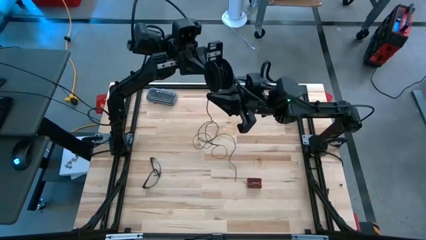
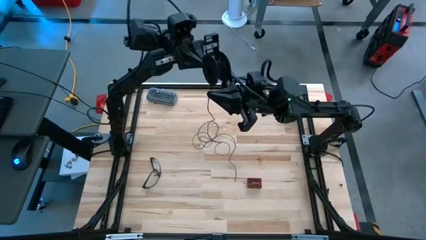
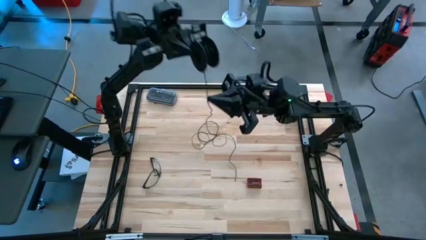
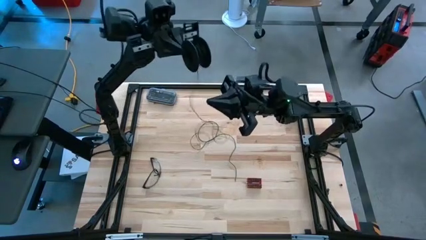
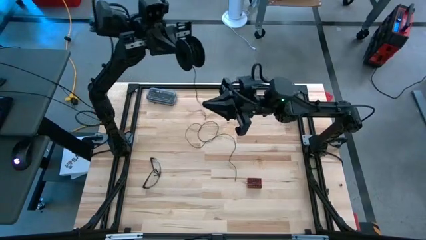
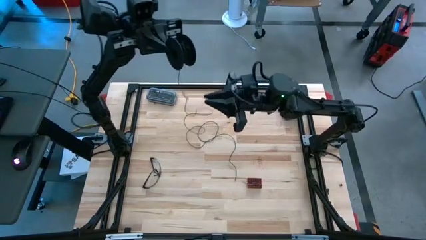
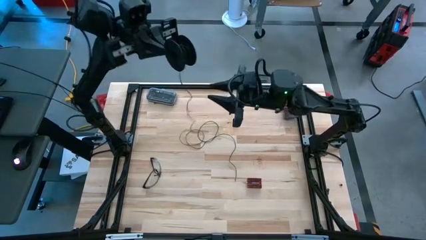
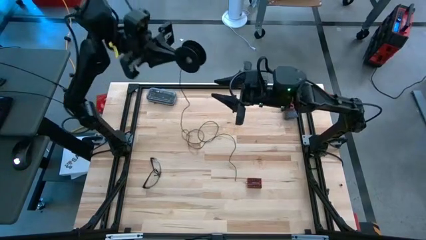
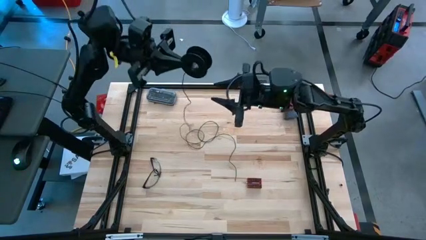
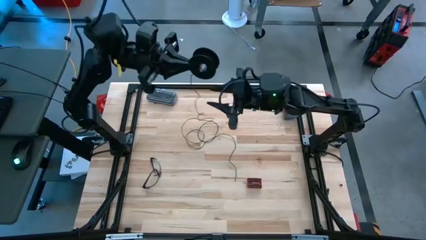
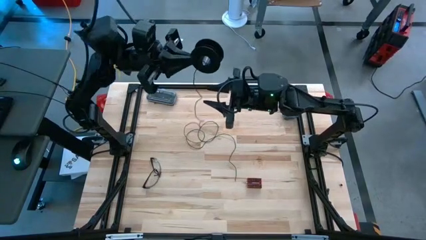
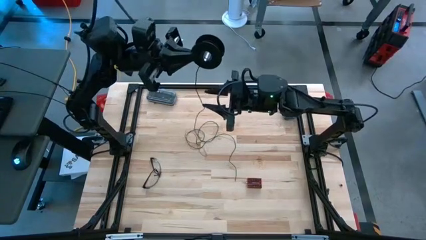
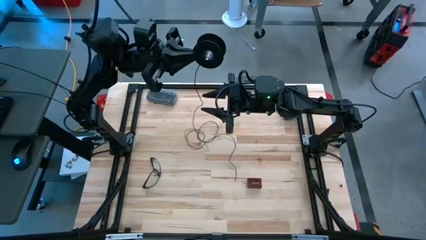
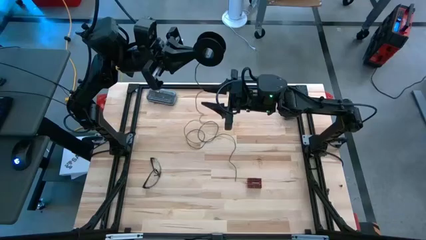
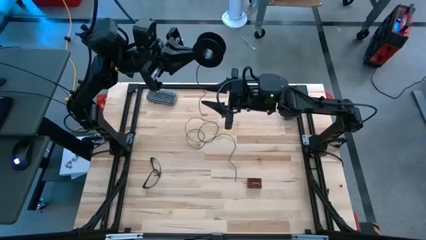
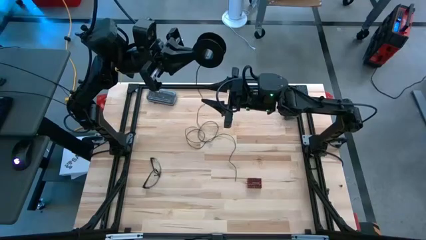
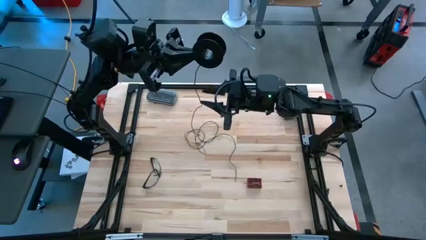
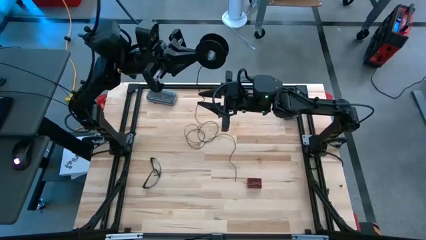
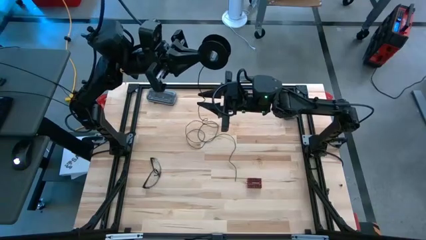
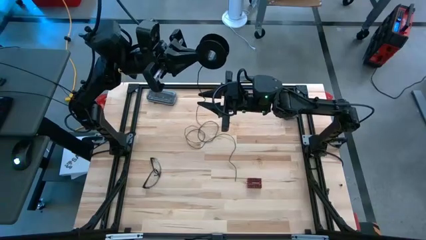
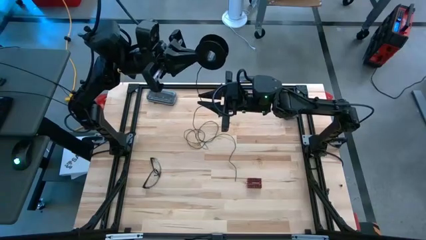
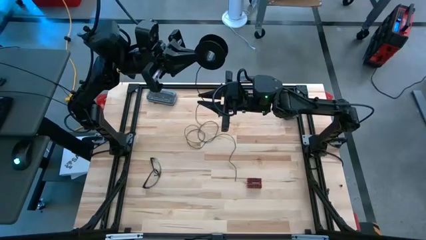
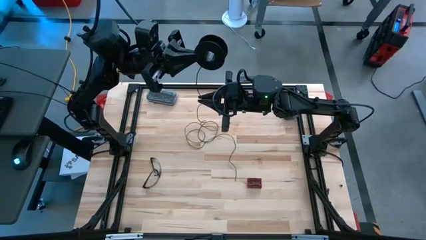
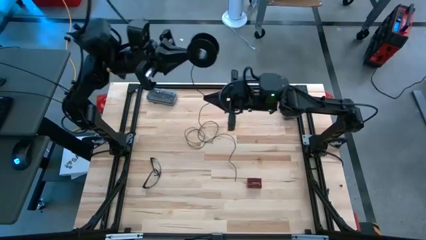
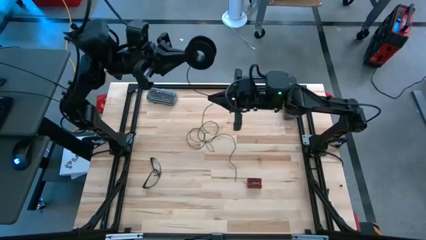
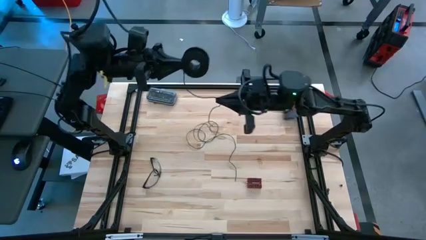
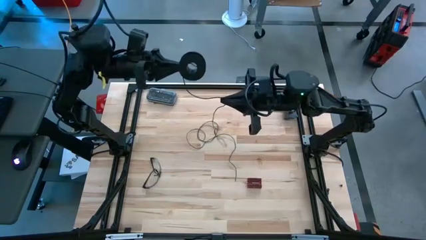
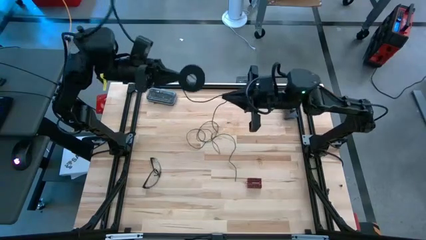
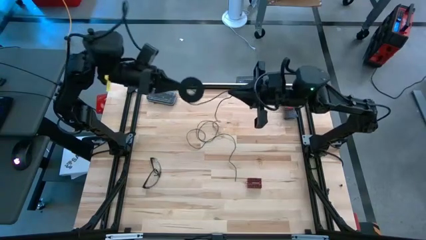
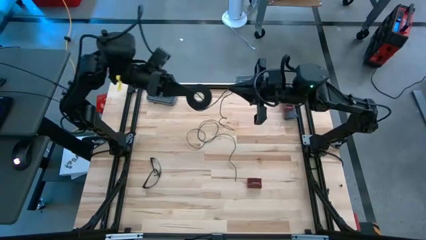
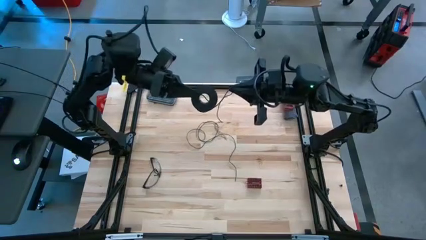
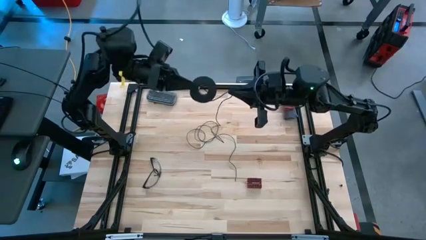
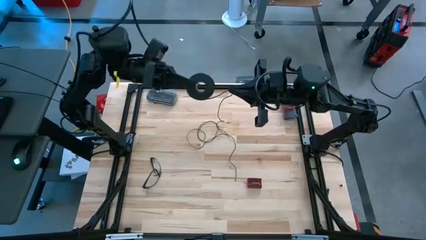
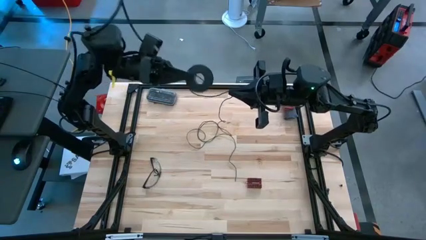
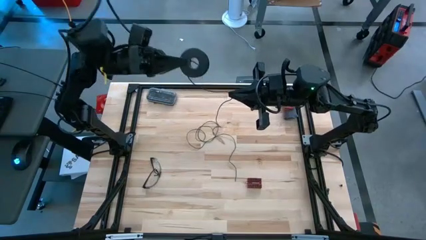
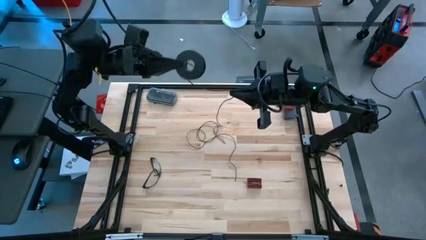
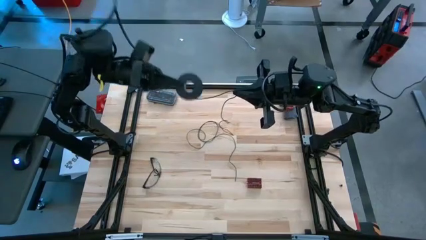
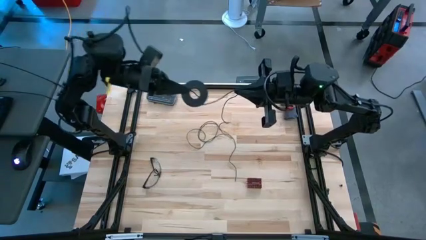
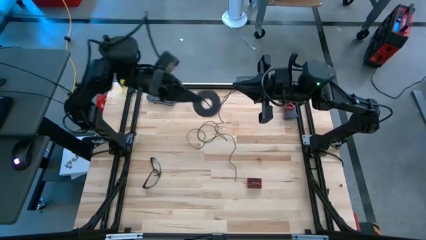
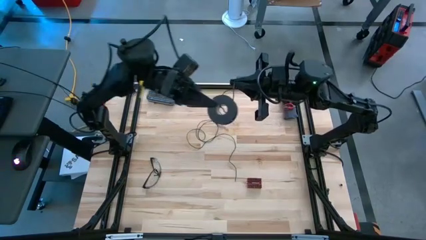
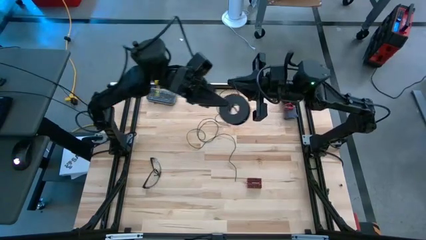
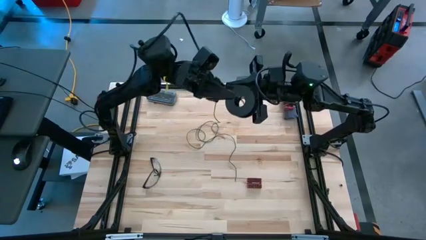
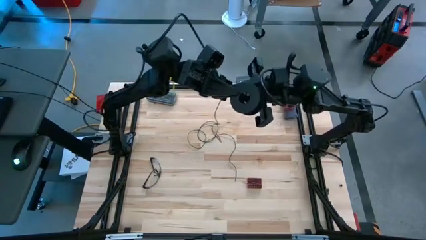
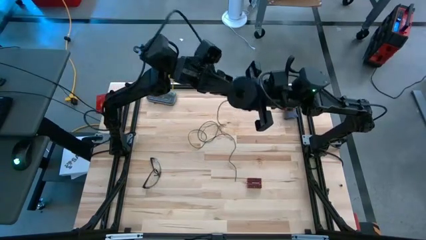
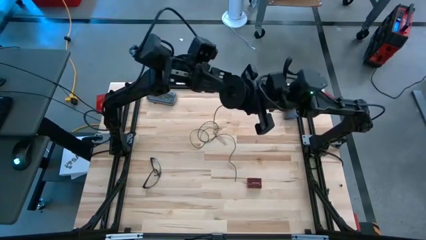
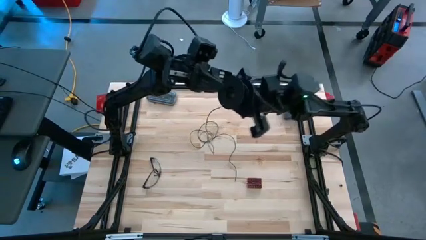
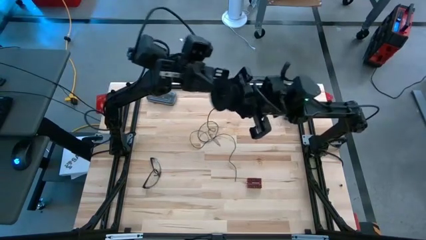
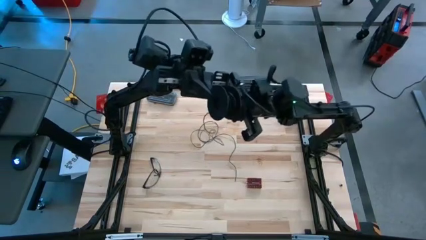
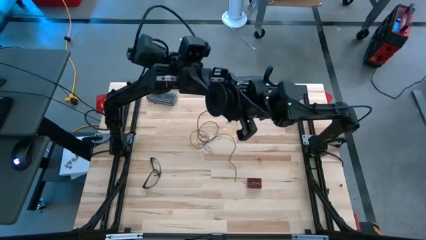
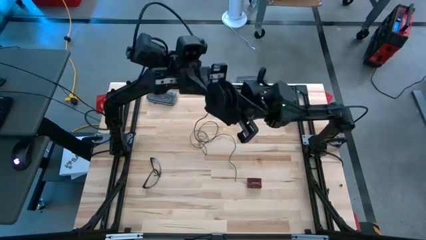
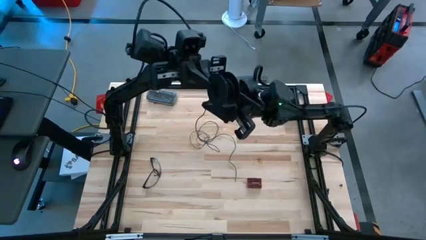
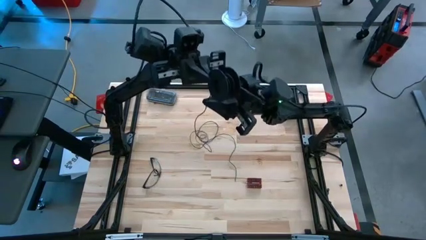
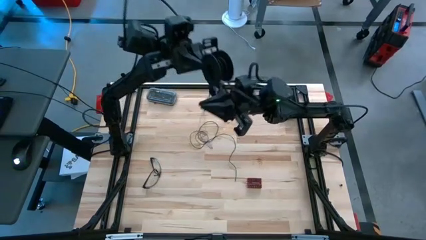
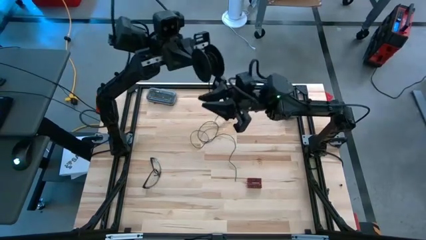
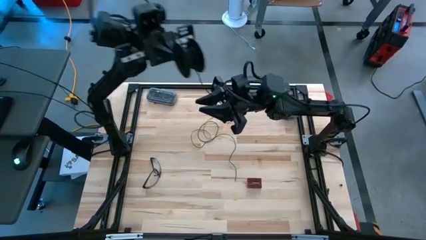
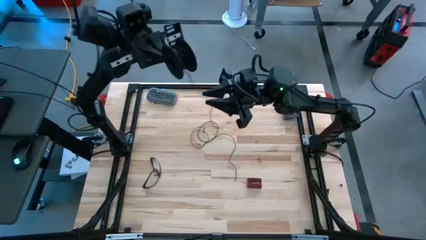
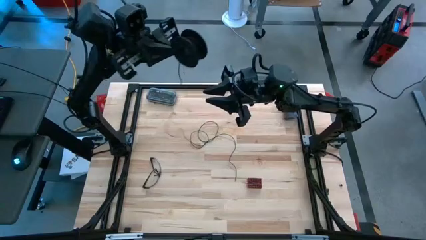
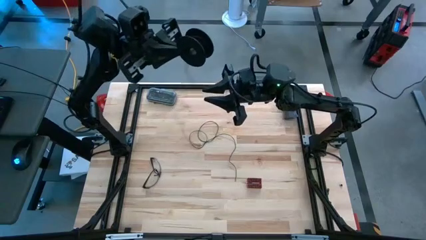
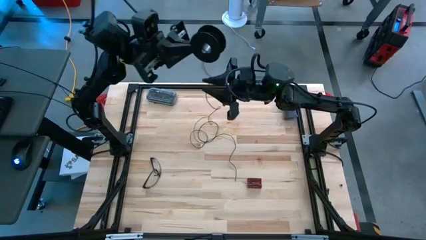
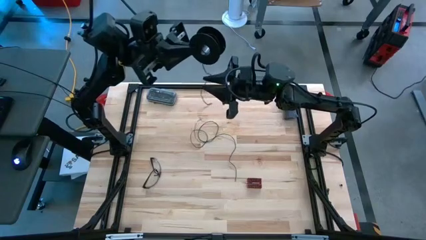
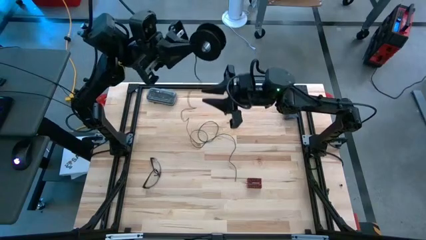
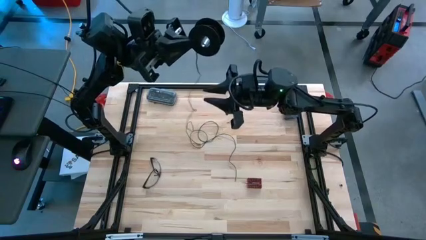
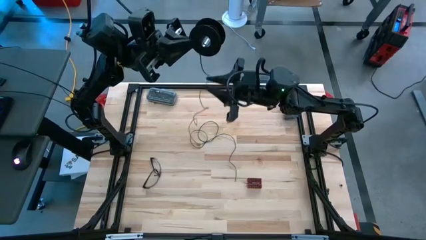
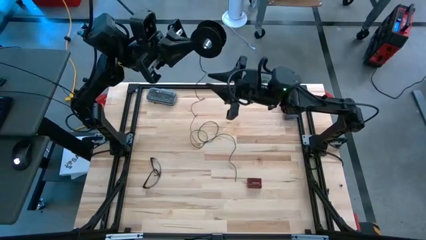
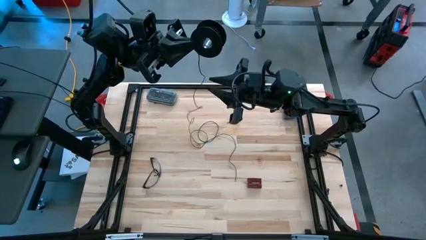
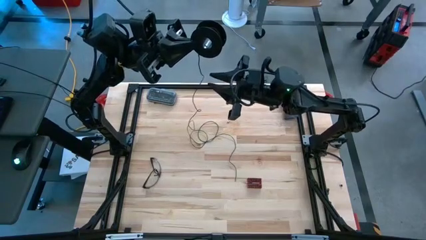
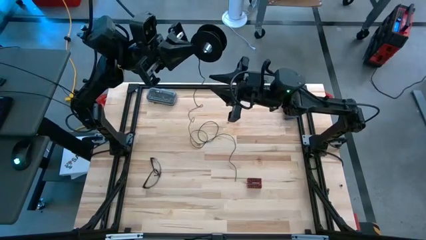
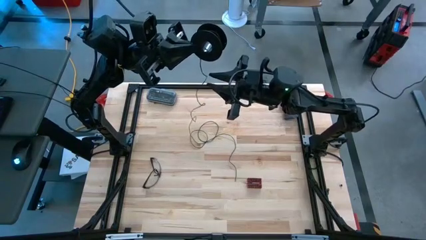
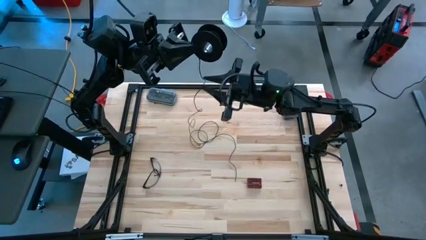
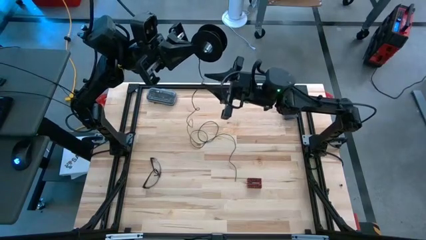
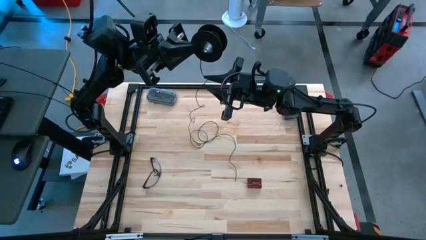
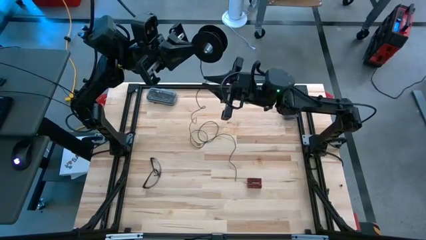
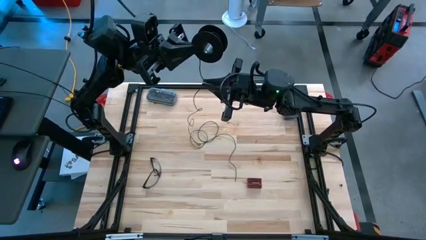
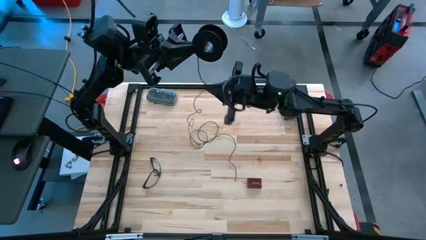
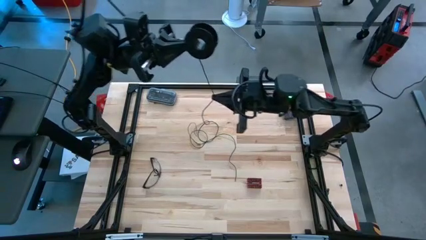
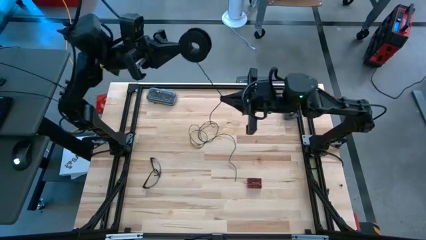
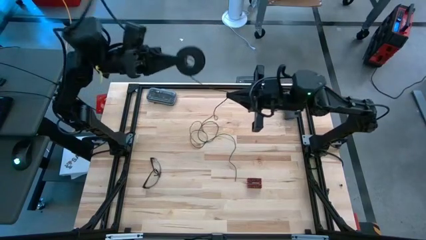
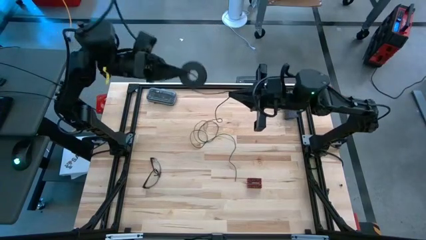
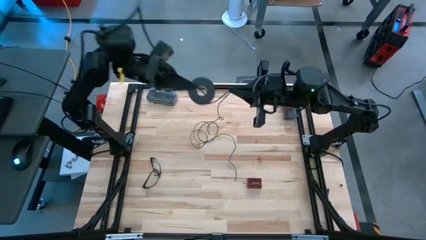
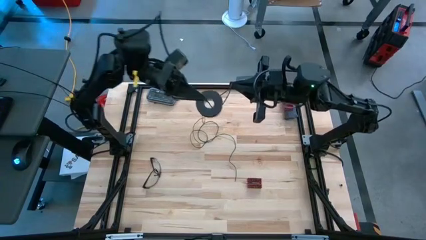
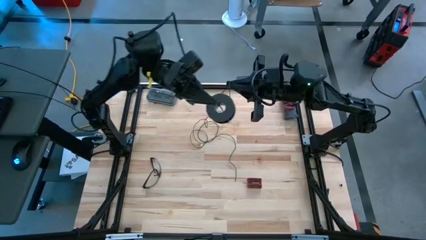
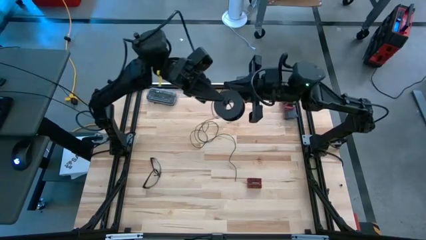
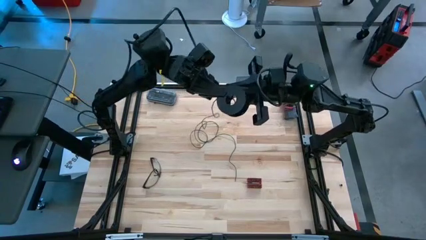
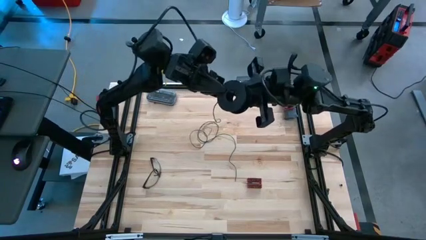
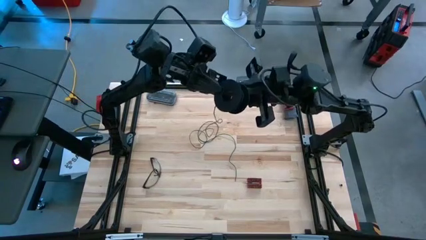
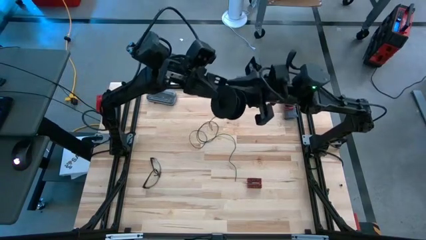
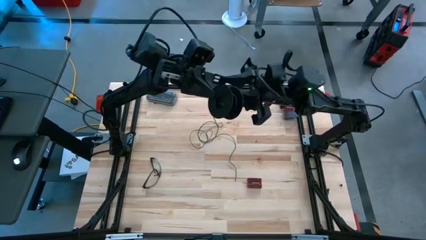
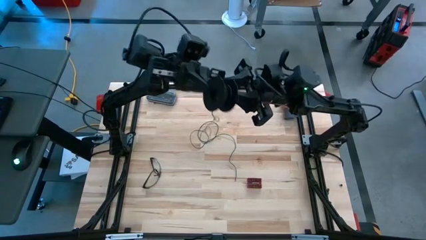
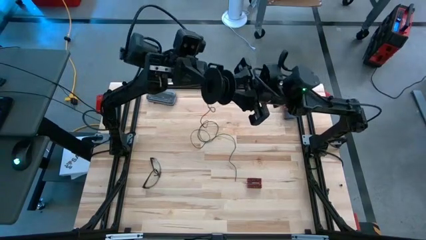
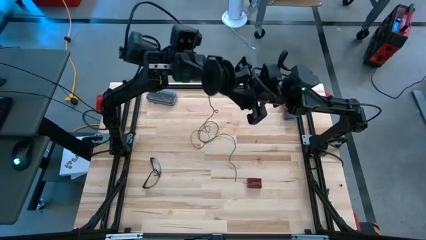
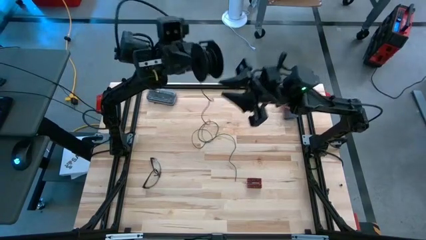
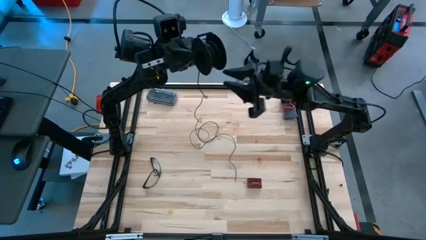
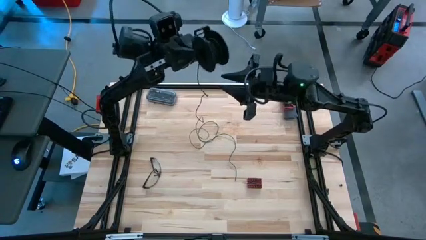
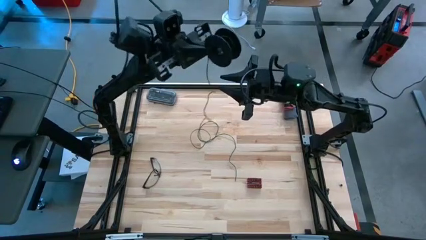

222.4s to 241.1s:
Task: Coil cords
Coil the black wire into the spool
